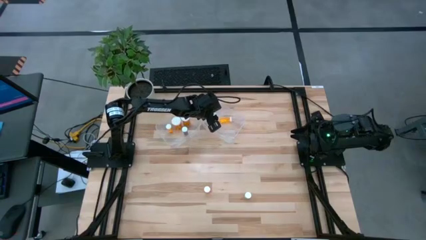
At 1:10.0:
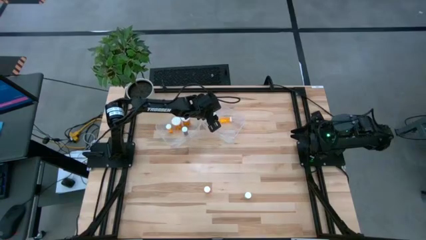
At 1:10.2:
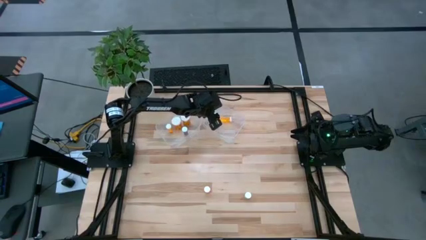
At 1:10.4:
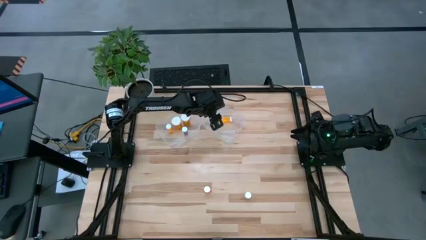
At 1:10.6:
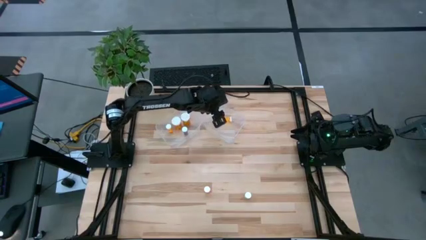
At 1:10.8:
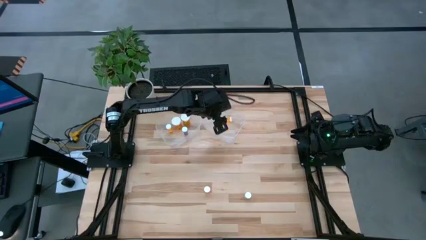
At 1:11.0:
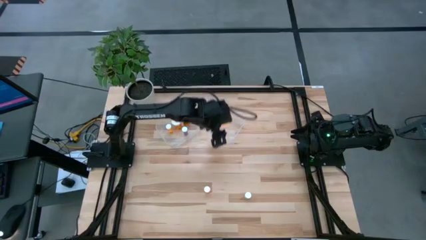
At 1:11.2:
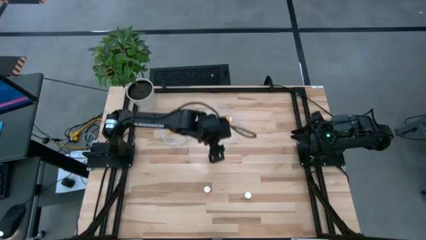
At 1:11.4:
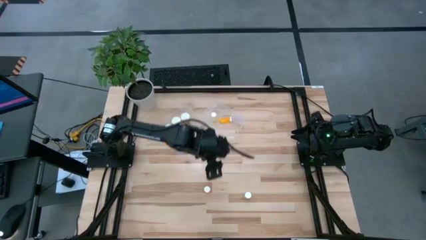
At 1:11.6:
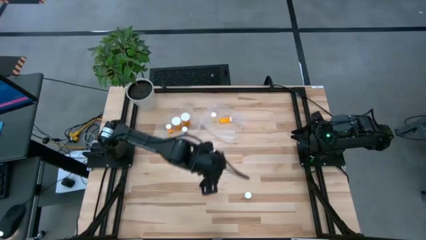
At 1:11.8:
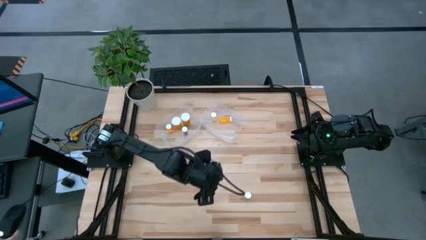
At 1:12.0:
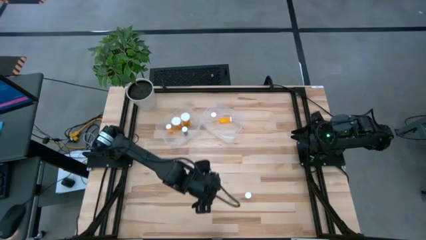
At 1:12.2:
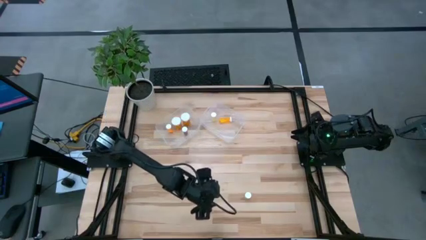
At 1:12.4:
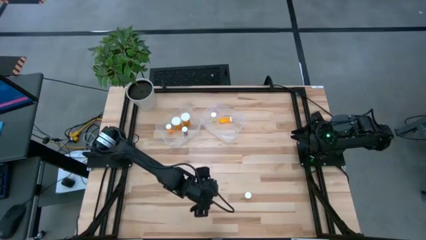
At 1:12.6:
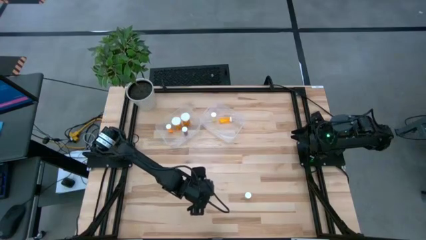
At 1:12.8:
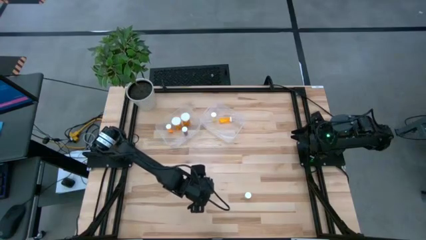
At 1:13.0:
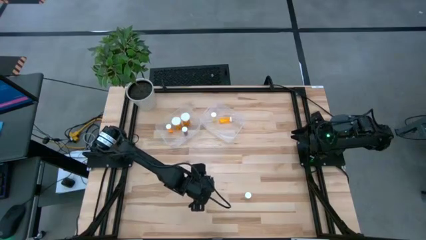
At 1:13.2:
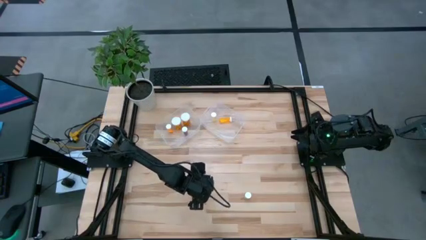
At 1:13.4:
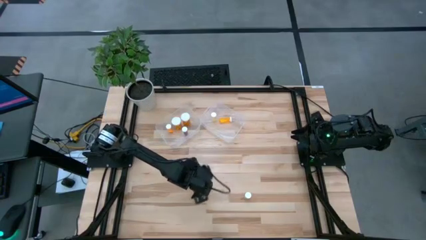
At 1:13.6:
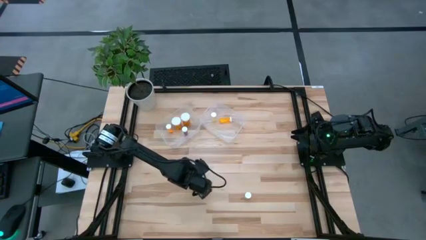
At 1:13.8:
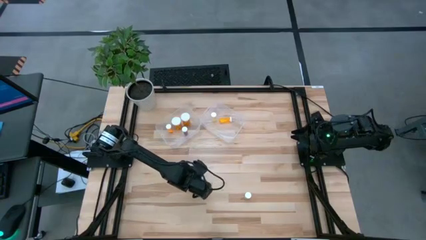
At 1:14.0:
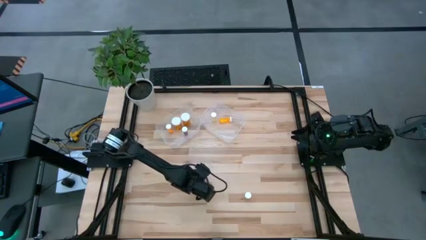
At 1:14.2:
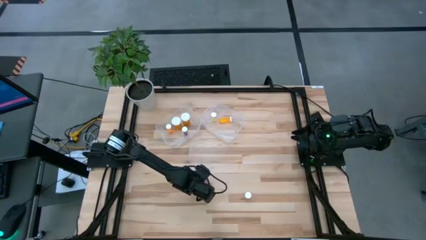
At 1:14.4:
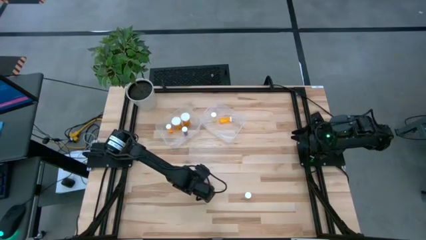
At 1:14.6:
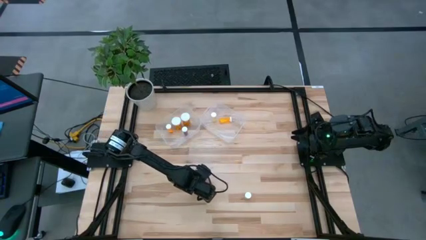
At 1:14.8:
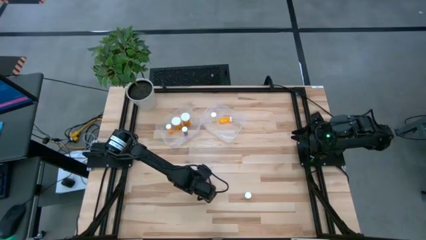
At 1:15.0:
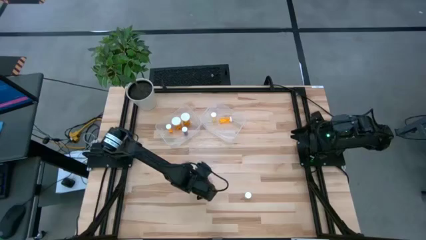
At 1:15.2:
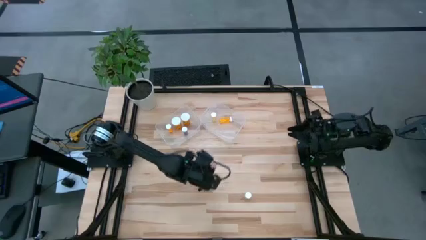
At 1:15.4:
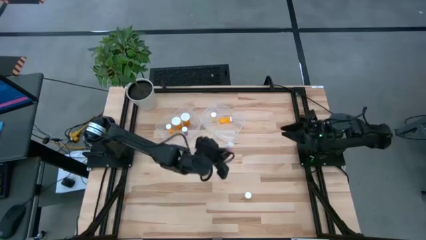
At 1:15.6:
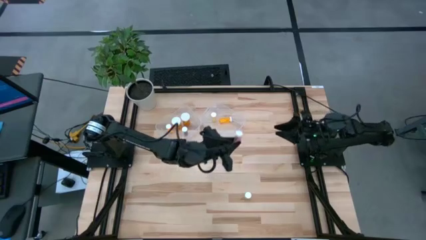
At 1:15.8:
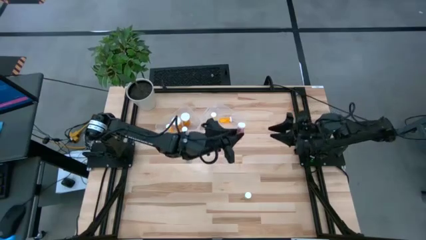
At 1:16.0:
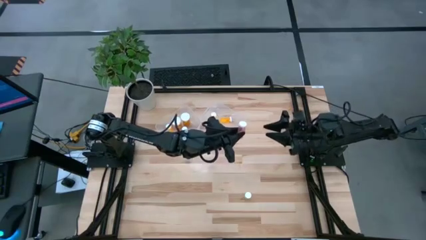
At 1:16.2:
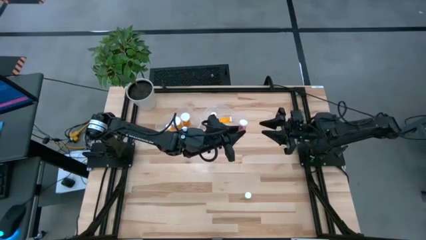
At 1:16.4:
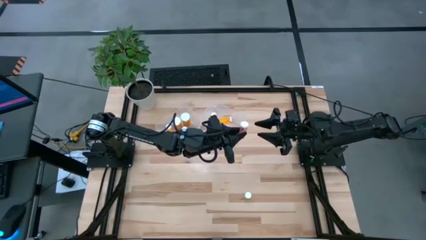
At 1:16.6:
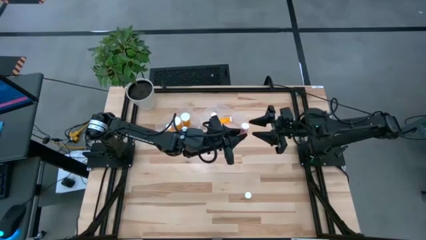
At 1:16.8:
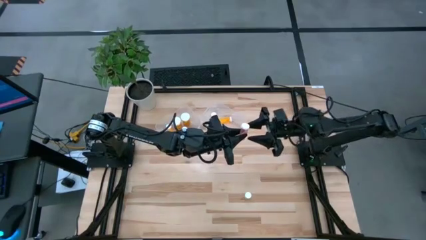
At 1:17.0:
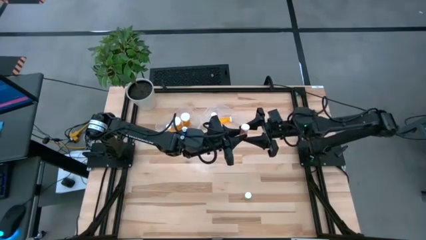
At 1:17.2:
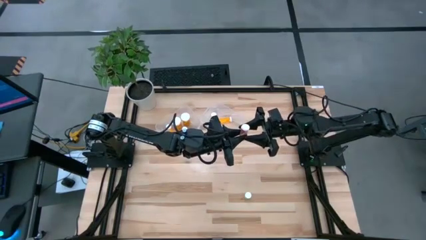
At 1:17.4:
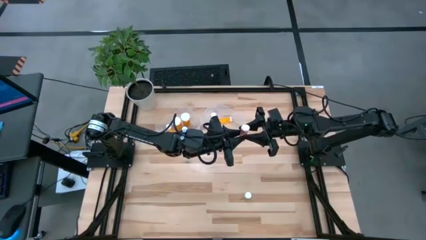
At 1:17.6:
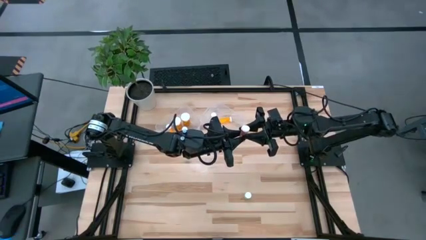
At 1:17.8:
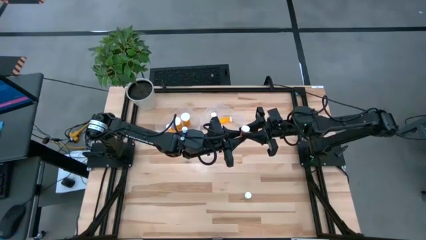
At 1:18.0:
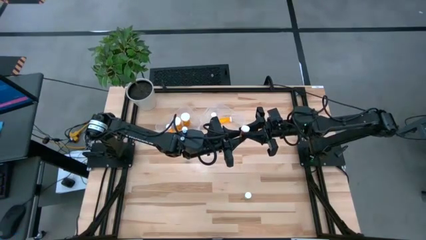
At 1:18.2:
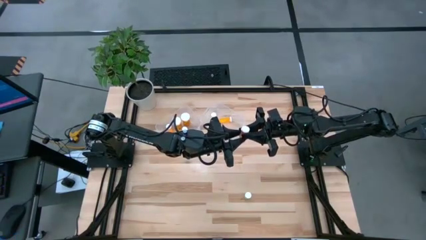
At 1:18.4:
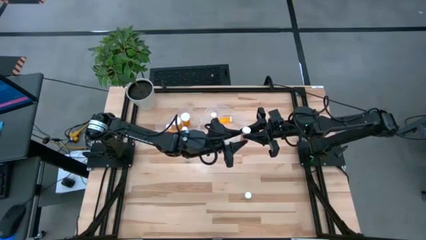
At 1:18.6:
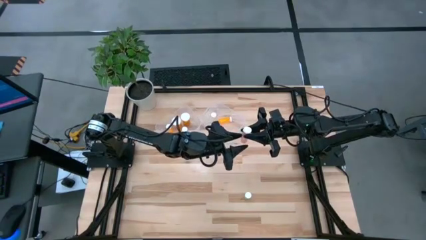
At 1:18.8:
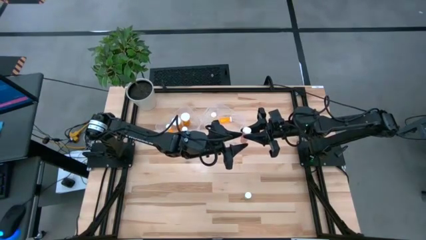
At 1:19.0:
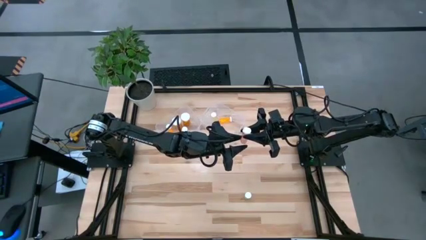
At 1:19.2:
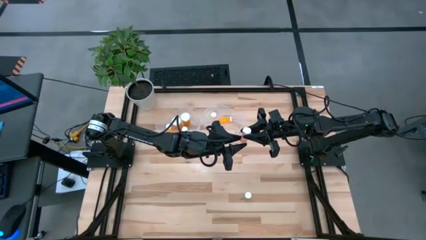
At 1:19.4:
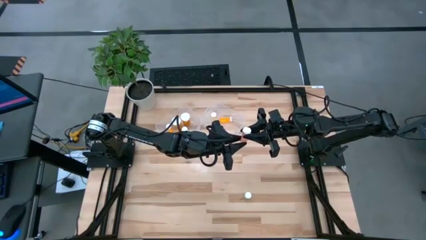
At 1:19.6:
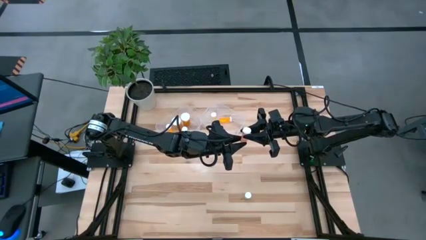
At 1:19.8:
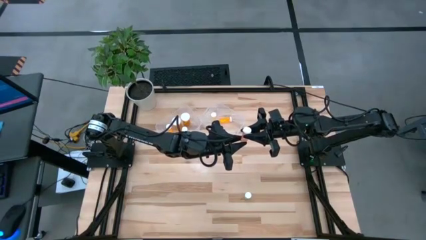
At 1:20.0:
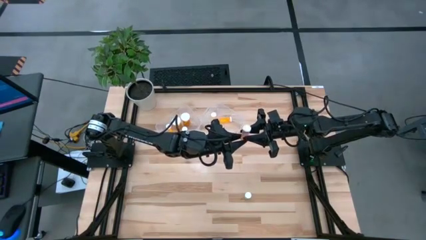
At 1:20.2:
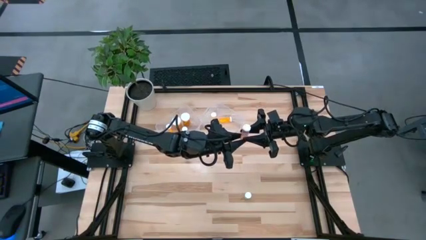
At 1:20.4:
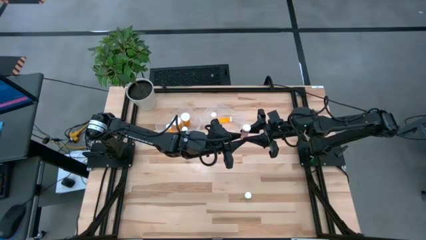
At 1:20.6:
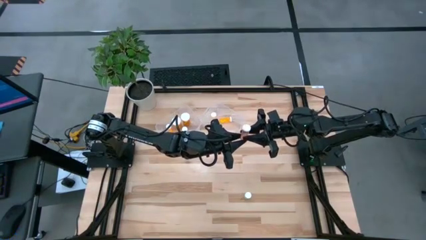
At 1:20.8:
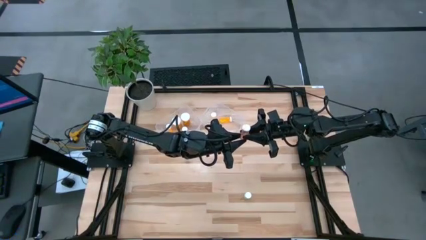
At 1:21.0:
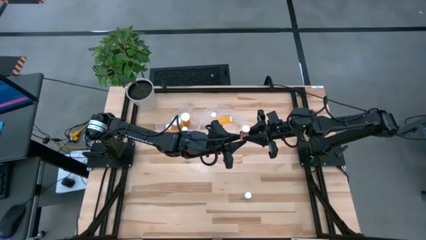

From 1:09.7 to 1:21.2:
Task: Pick and place medicine bottles into bin by pill shape (circle, oval)
Put the small pink tablet bottle into the right transparent bin

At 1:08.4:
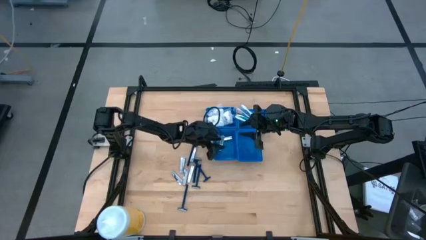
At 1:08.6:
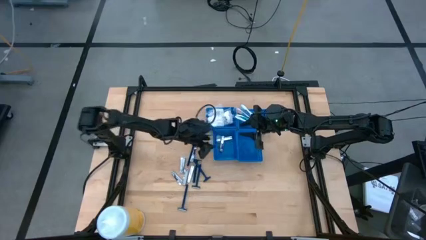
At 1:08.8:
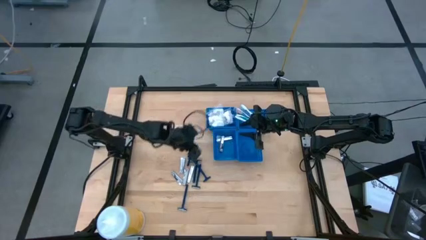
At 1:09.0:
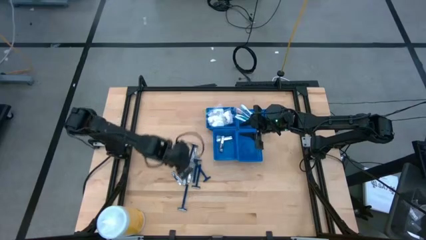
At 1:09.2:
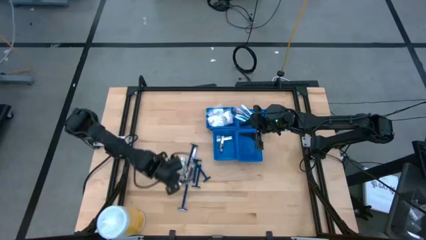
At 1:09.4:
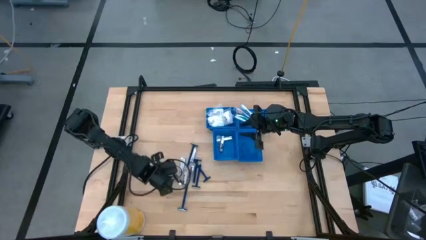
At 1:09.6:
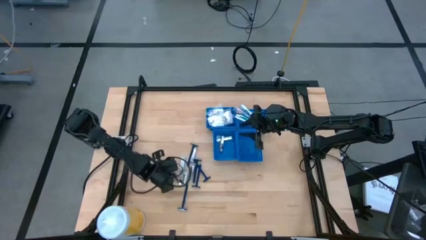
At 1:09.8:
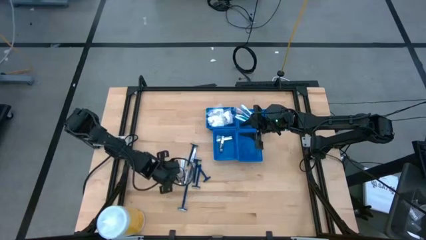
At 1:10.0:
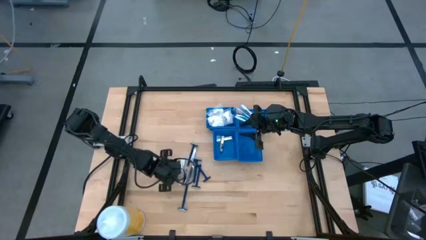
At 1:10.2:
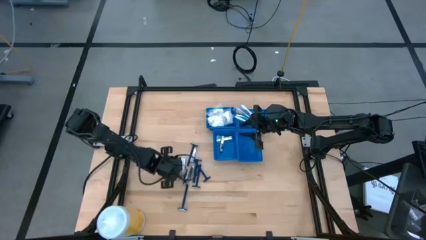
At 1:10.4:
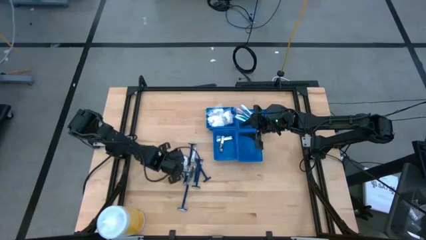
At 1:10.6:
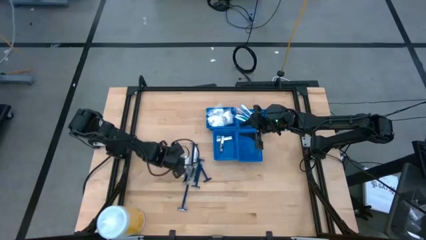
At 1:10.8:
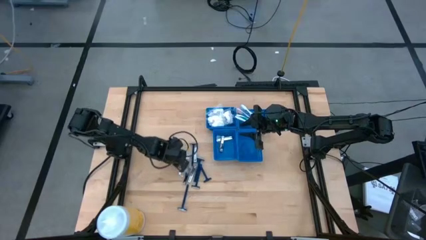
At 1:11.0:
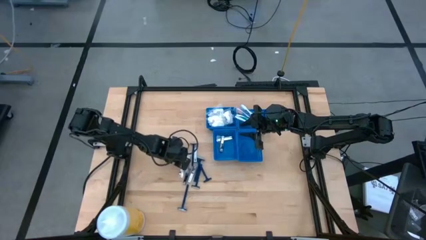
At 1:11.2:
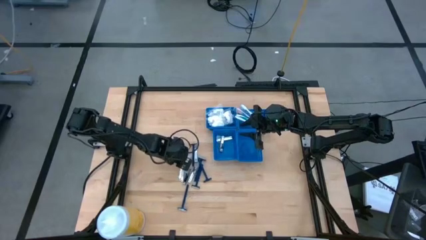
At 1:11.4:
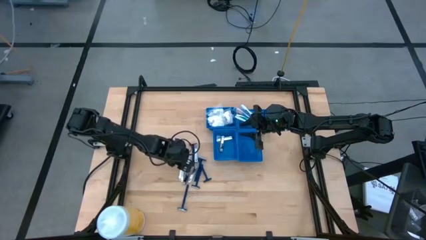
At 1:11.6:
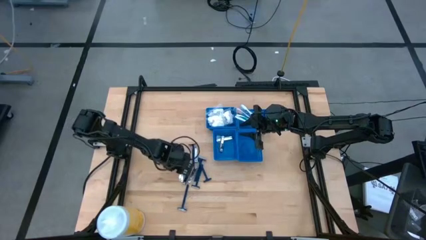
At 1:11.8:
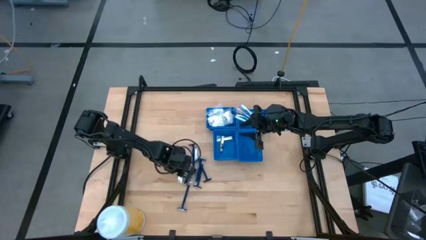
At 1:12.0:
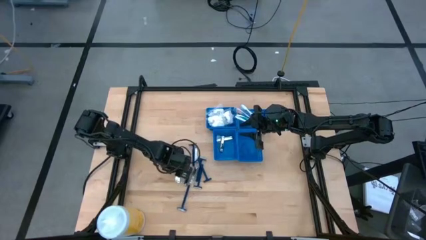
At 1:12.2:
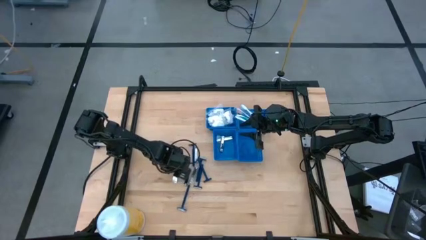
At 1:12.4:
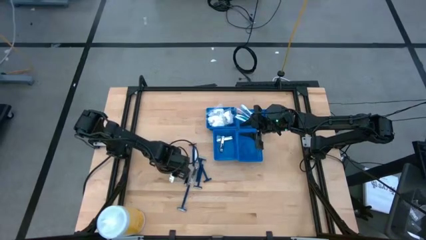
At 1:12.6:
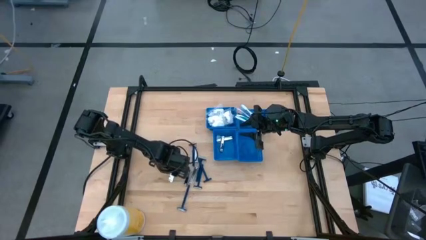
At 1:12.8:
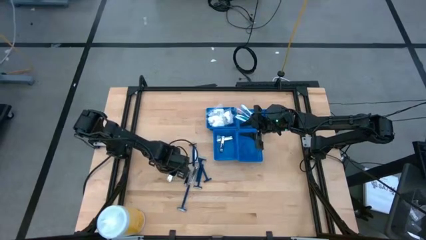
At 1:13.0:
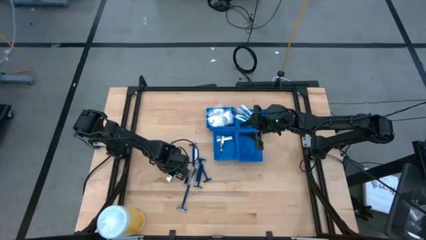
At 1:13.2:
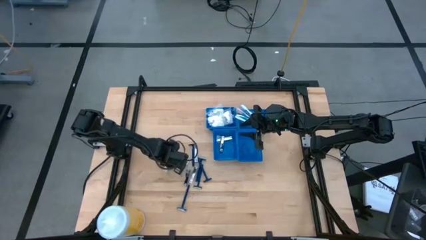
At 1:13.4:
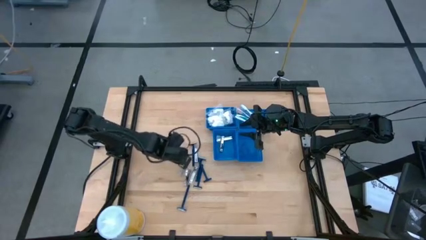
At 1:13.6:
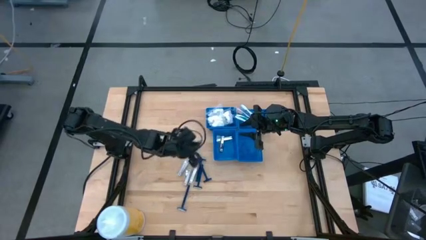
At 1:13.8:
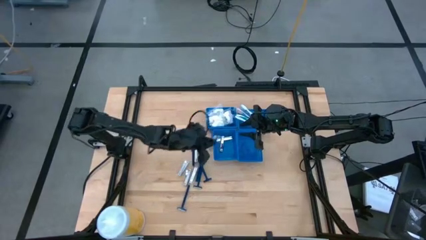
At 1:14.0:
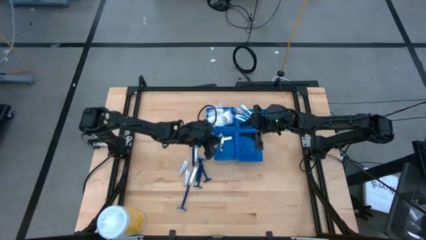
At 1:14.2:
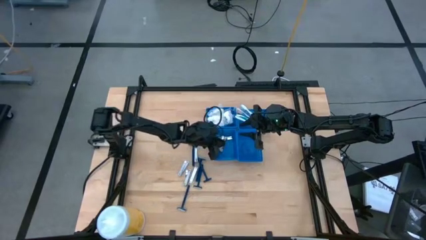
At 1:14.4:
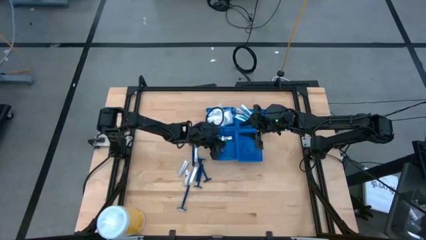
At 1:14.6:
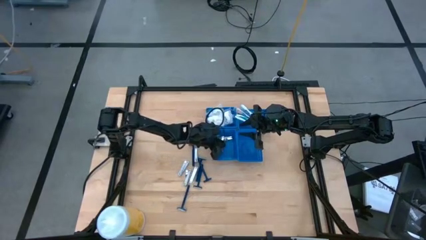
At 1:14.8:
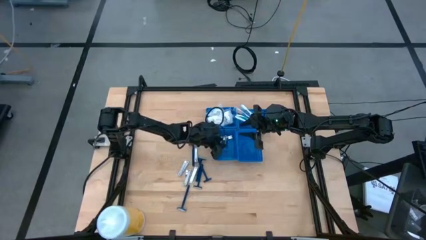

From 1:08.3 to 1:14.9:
Task: Pick & Place Travel size toiletries
Put the silver nail cutter into the bottom left blue basket
